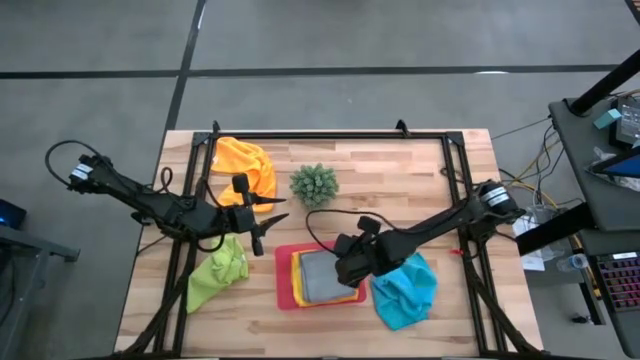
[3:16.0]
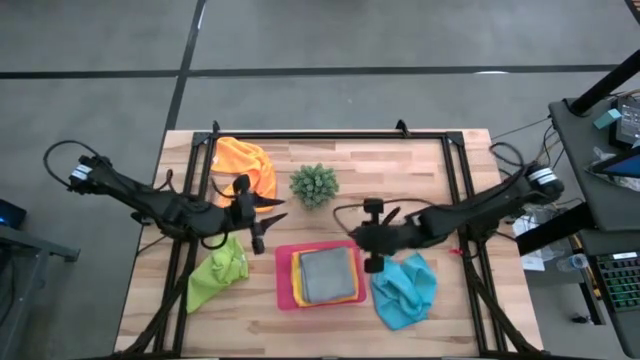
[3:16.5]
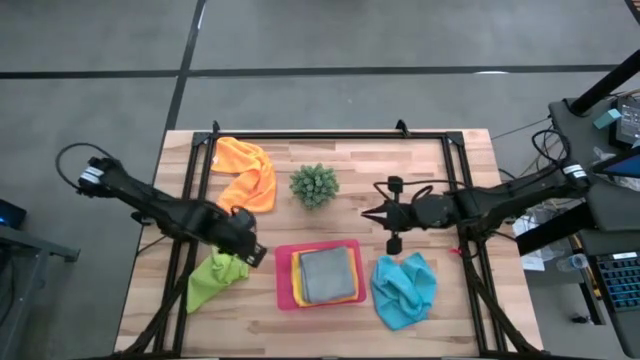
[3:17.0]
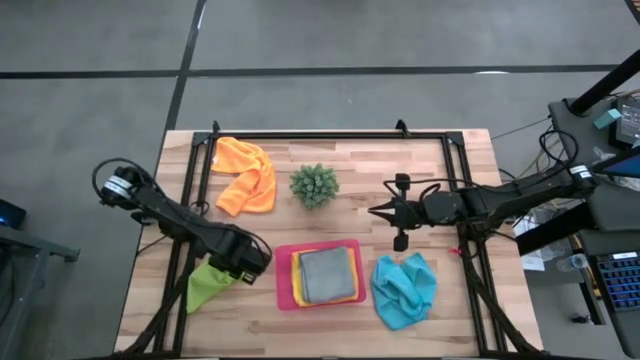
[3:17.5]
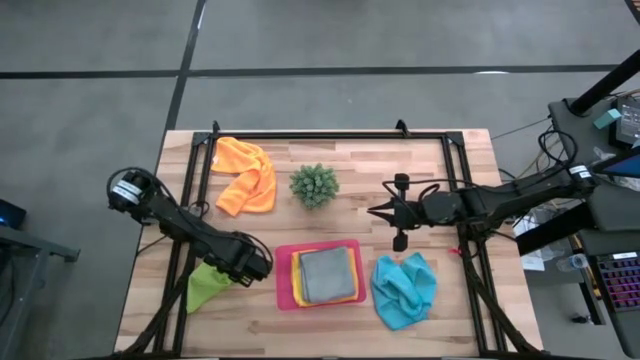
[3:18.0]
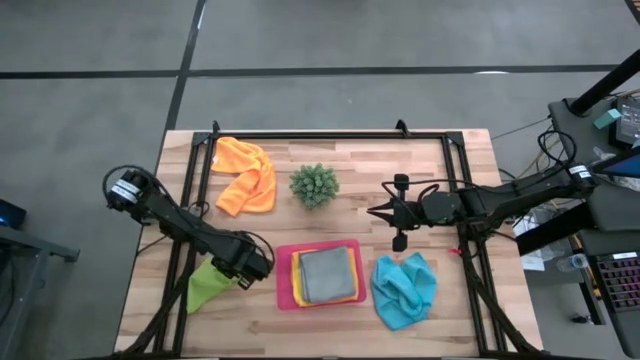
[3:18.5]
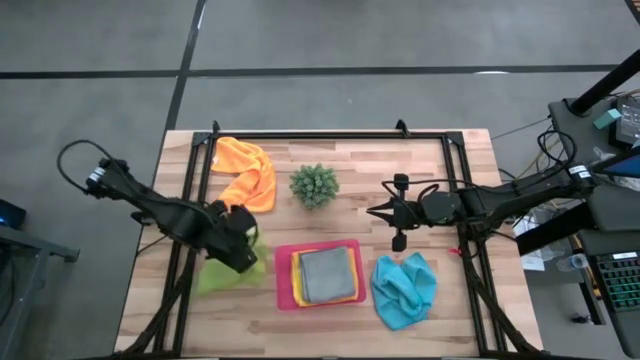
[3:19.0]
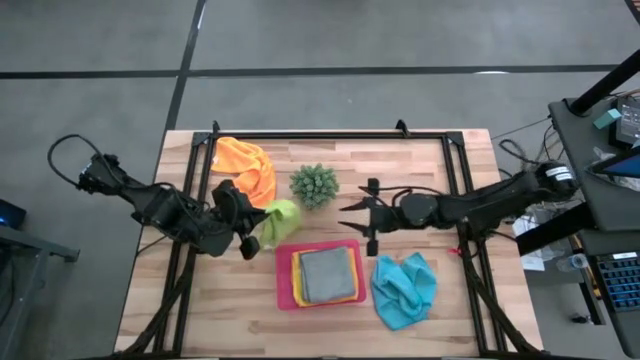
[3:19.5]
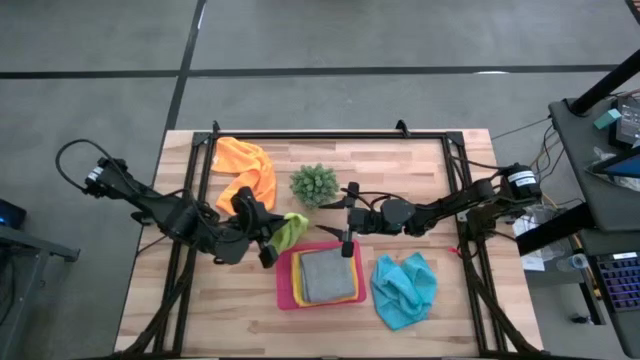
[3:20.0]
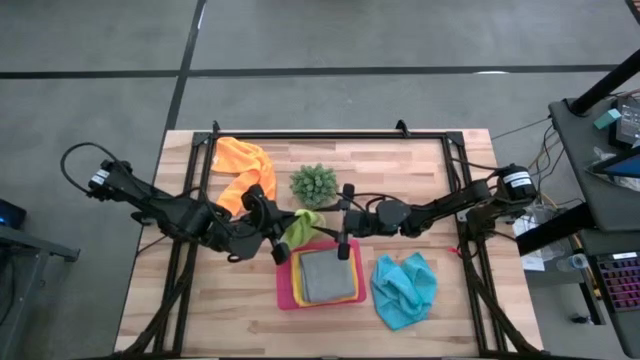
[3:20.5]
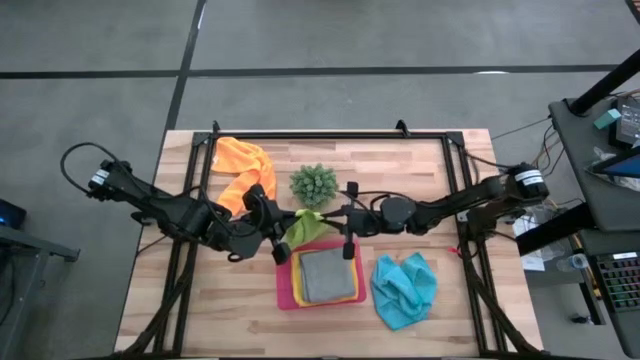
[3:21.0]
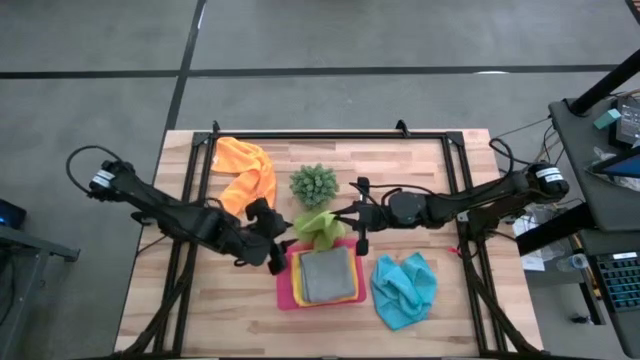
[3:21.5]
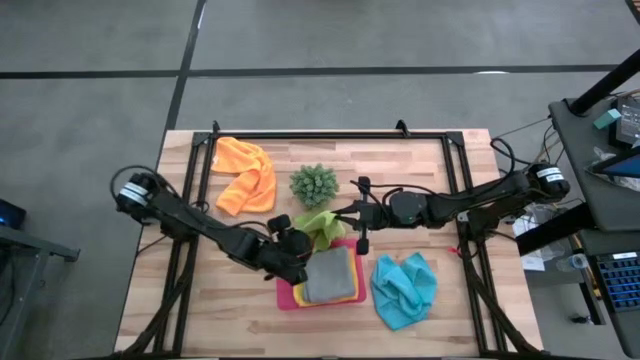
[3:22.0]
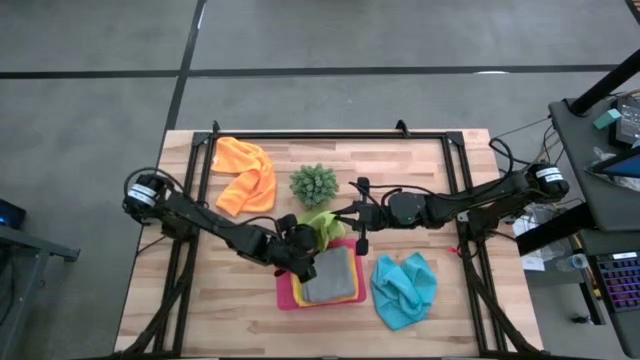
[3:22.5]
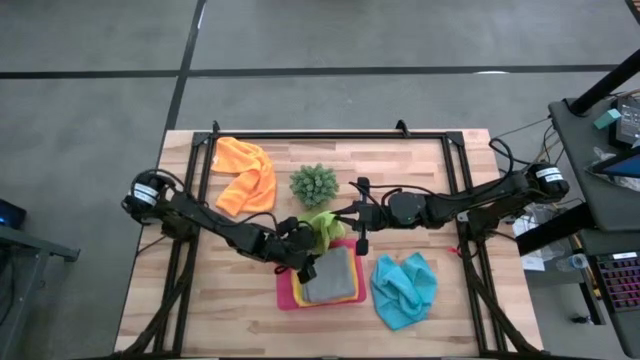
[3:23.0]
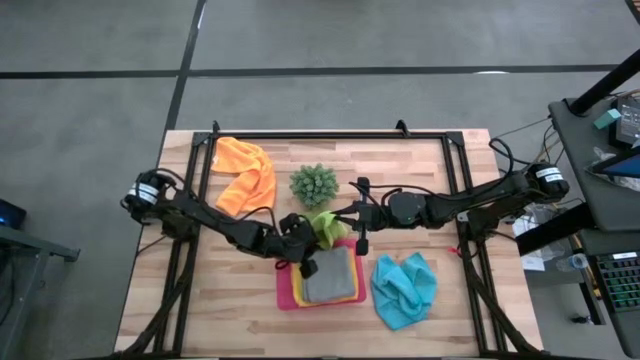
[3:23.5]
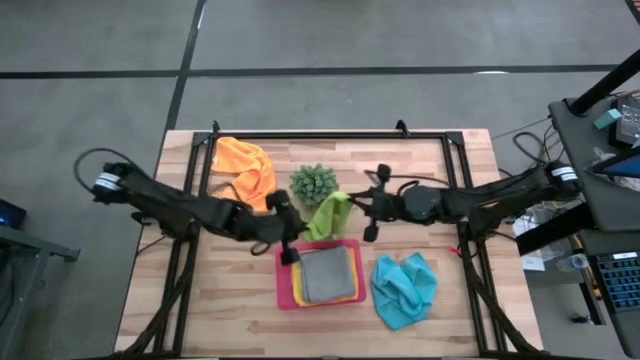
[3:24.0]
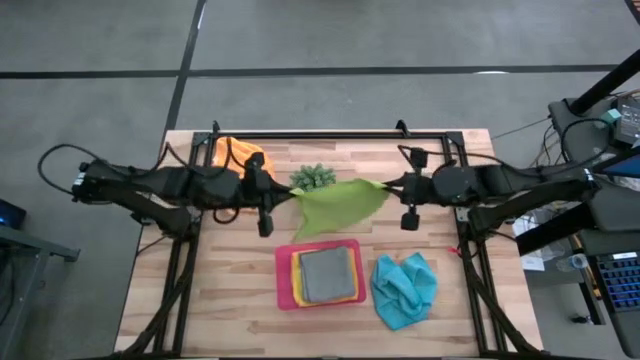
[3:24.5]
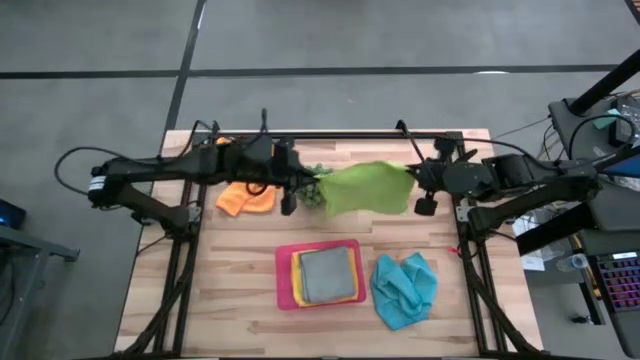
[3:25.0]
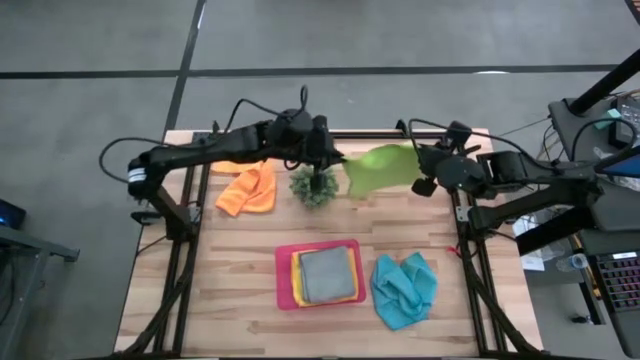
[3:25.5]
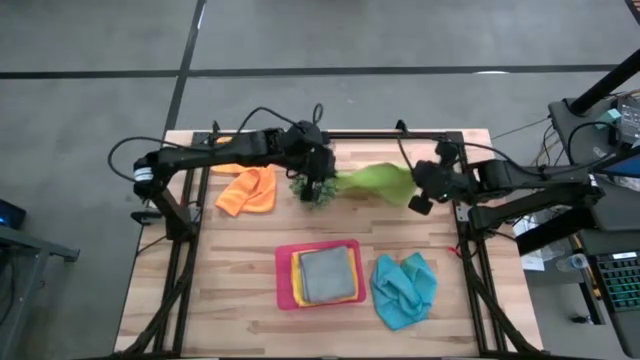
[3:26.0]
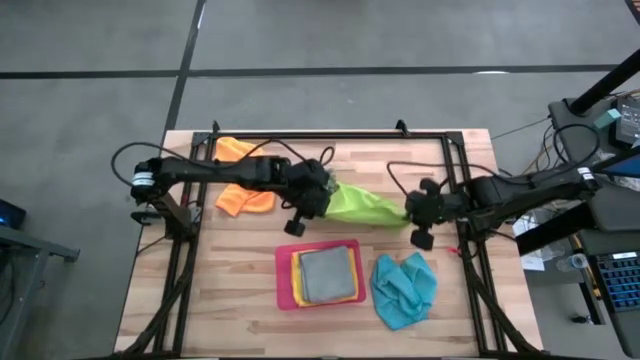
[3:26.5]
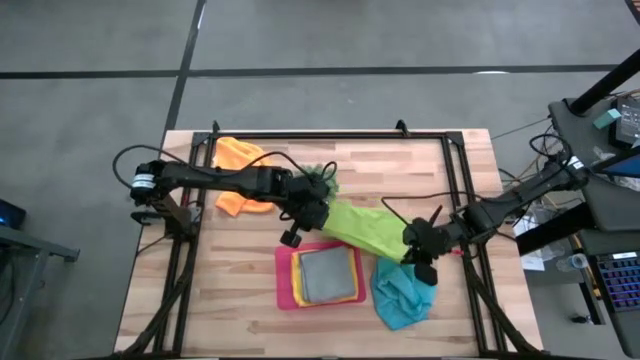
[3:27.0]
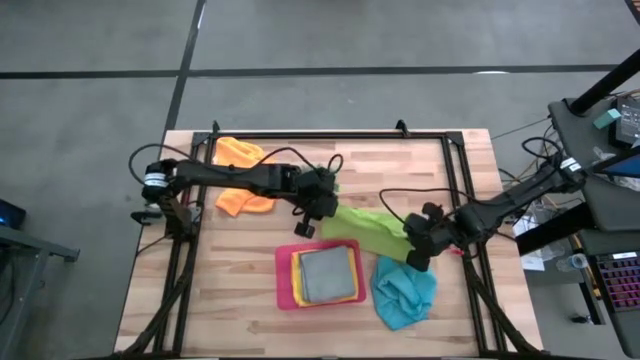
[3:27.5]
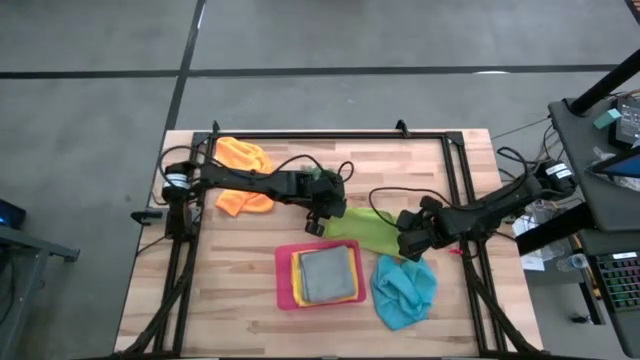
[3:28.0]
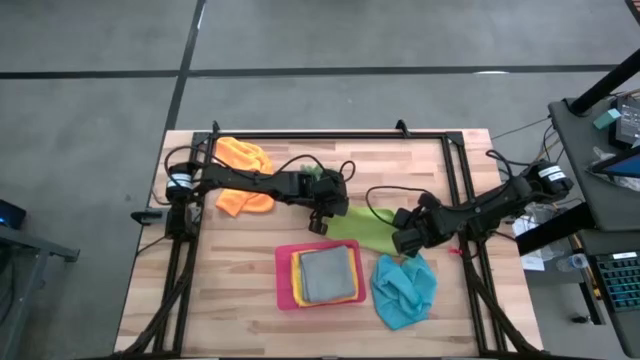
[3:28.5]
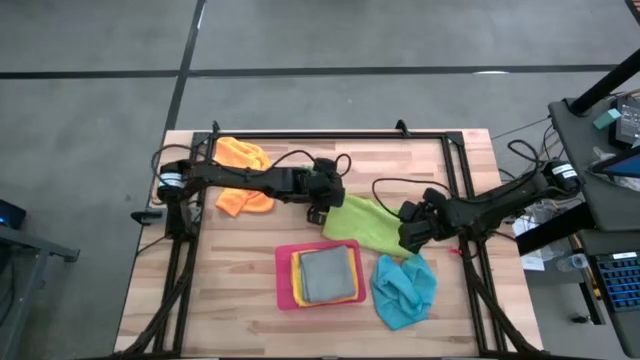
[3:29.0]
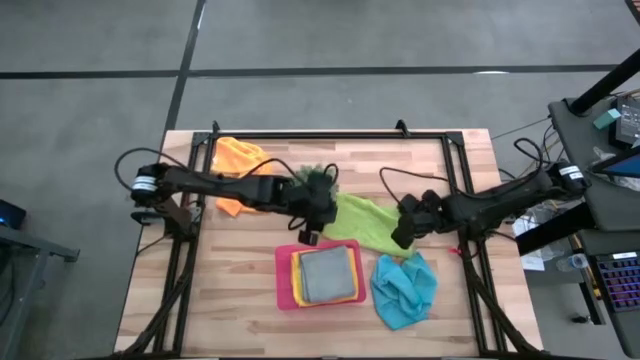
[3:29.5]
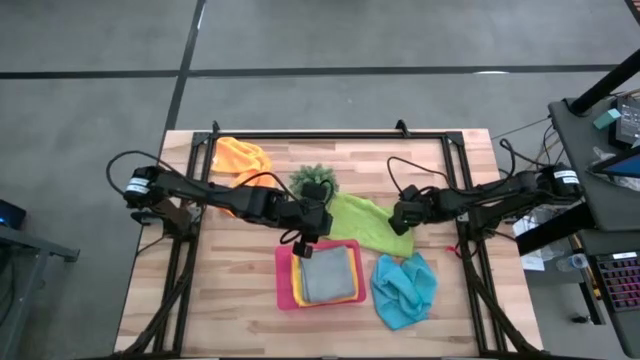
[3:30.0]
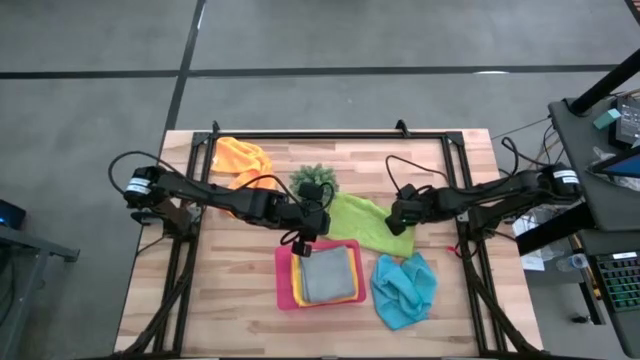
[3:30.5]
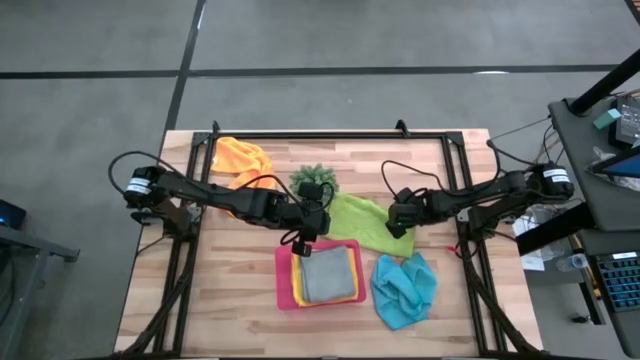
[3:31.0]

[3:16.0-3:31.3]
Task: Fold microfiber towels
Fold the green microfiber cloth

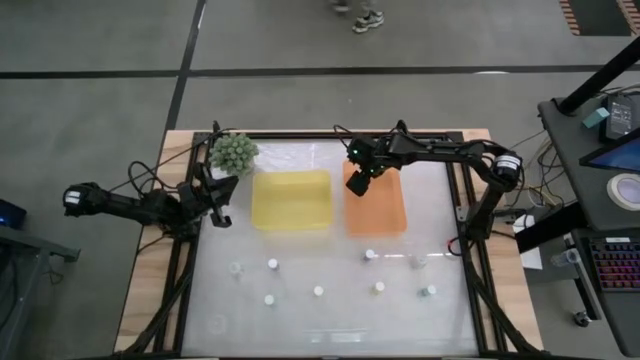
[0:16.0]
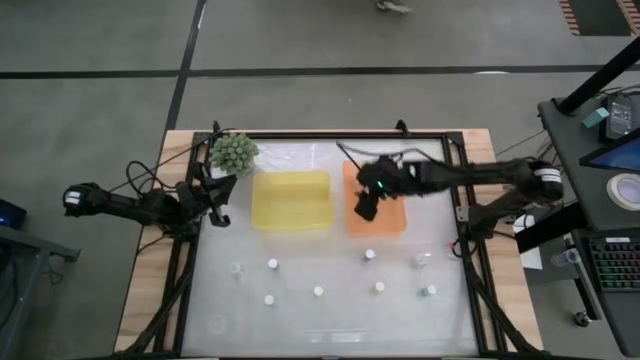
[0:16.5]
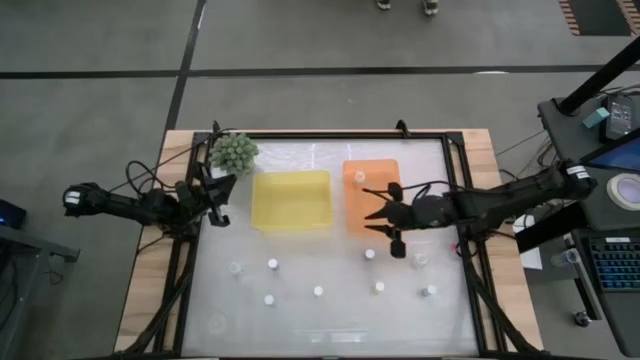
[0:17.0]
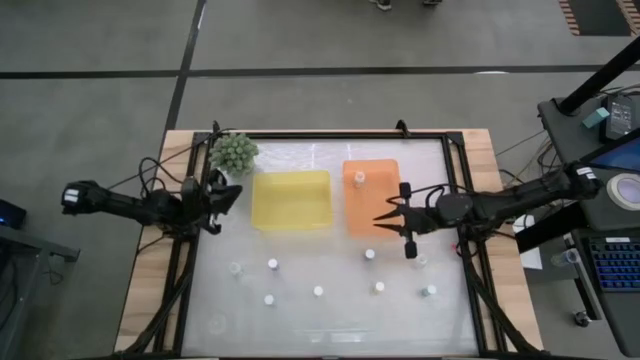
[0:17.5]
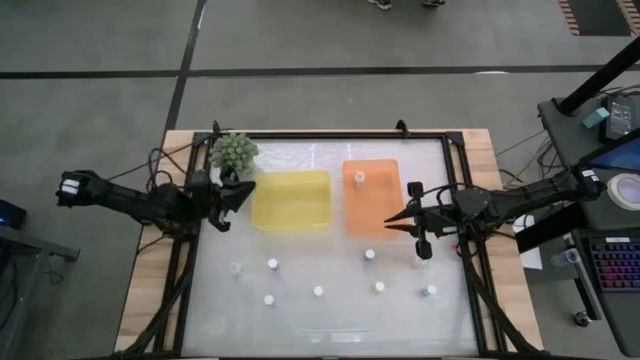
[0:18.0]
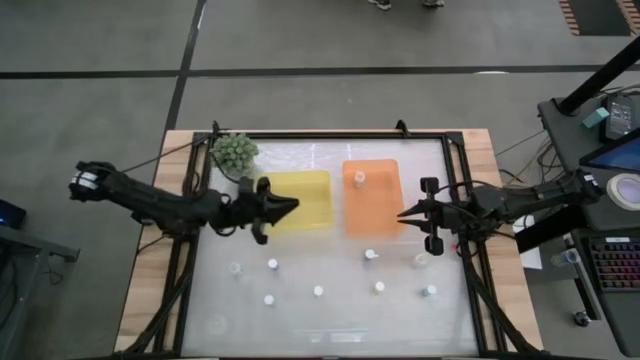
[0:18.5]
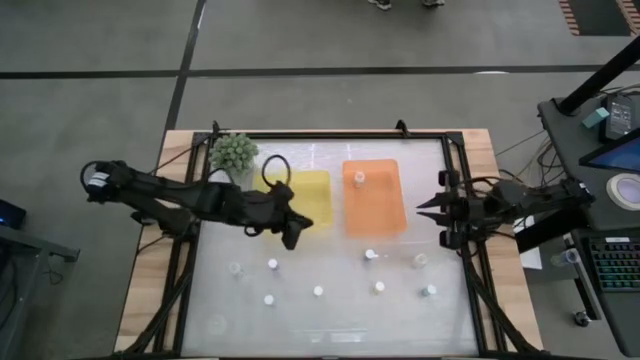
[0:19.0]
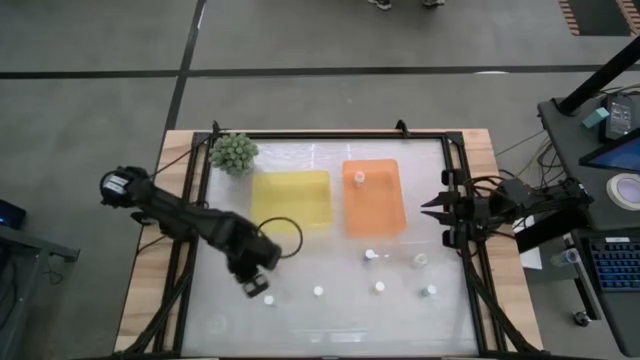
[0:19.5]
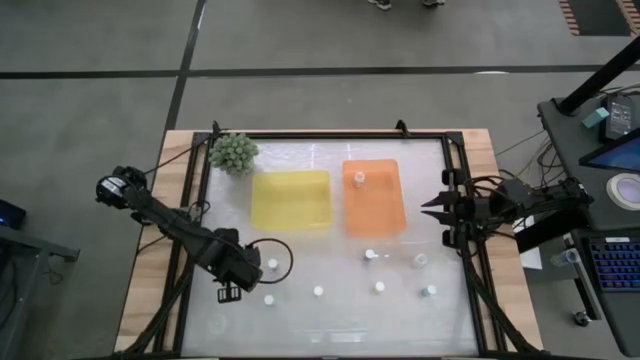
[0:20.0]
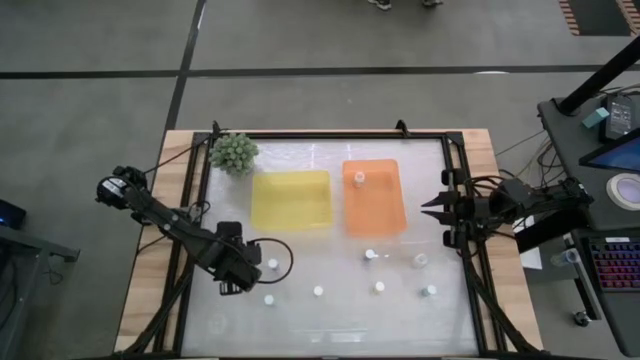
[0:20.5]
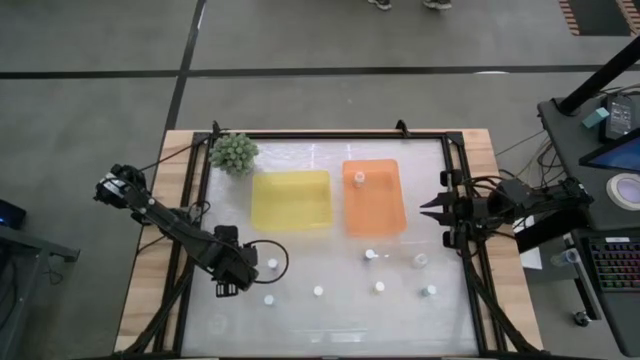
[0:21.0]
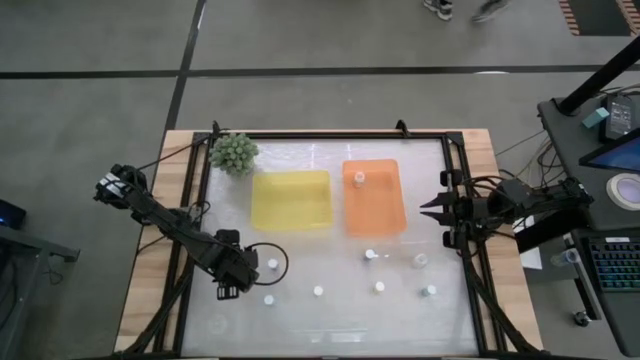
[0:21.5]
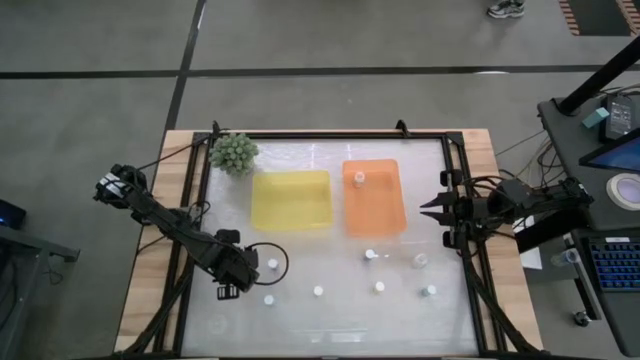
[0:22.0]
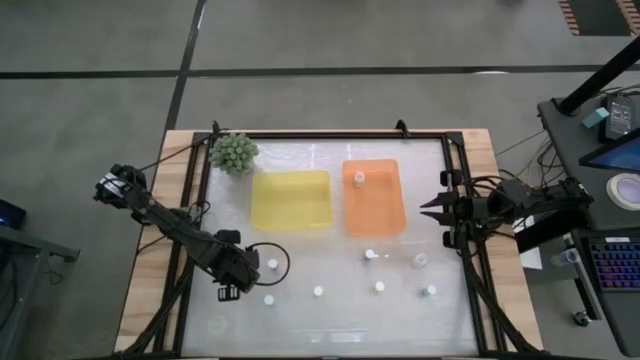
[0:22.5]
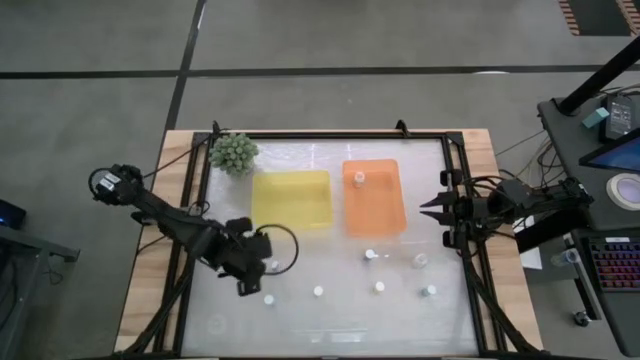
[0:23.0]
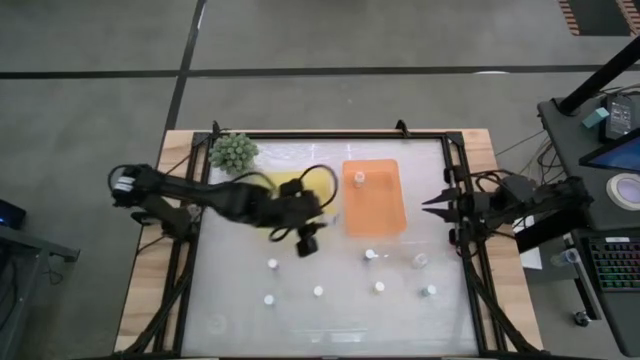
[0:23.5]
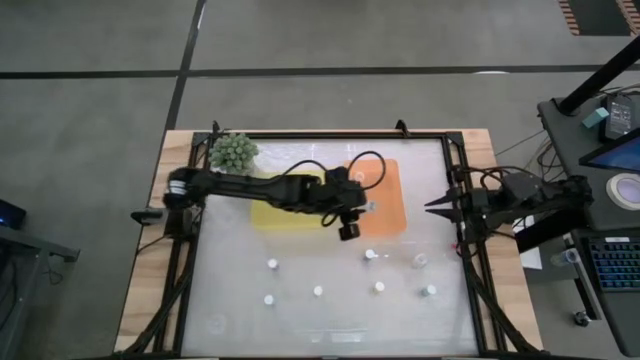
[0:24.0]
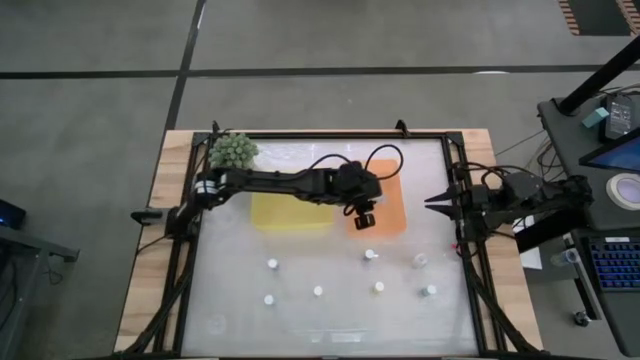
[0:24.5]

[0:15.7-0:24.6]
Task: Pick and place medicine bottles into bin by pill shape (circle, oval)
Put the transparent pill bottle into the orange bin
